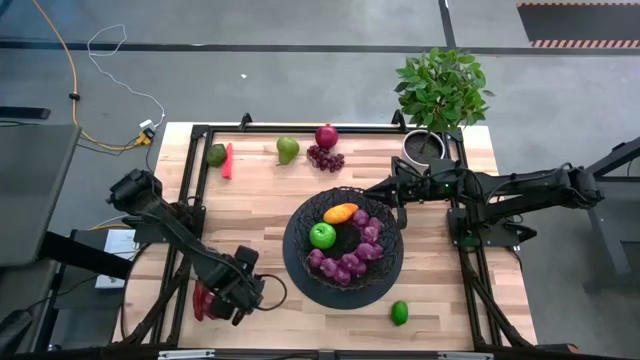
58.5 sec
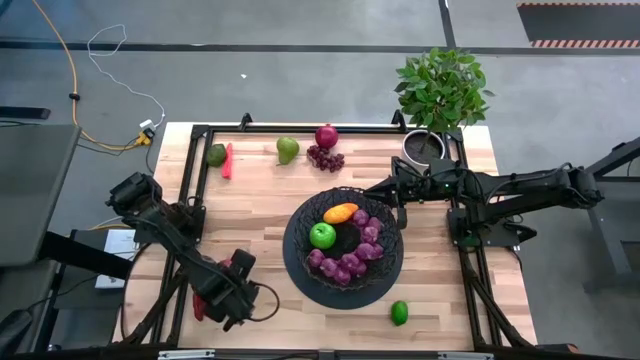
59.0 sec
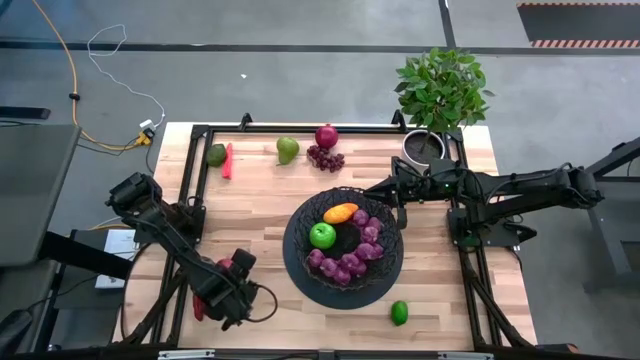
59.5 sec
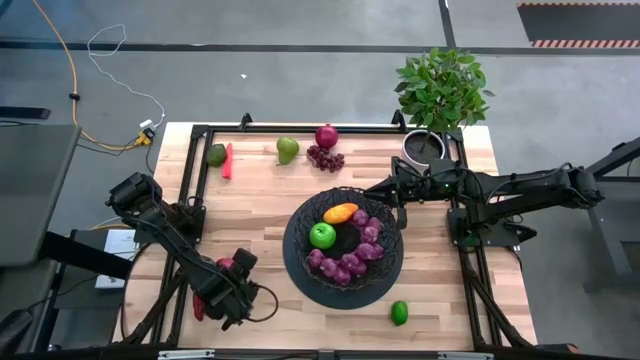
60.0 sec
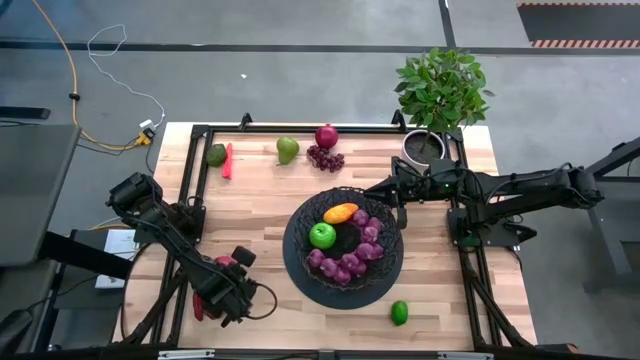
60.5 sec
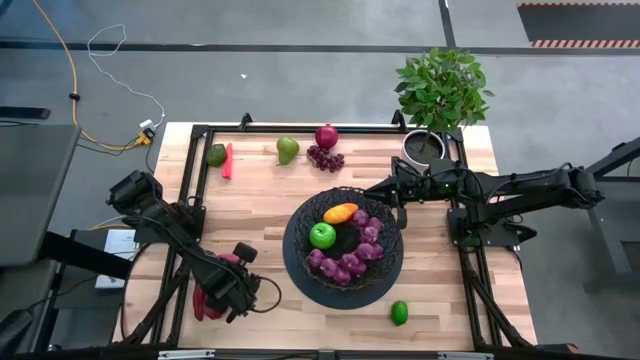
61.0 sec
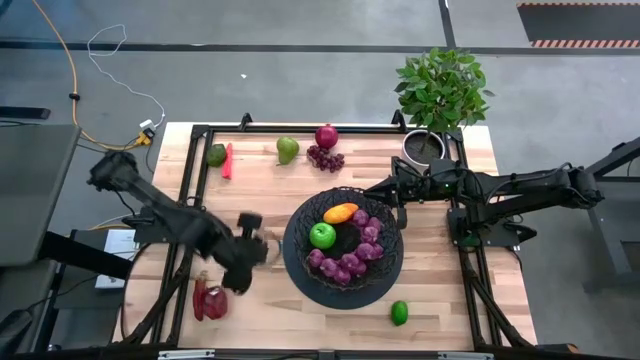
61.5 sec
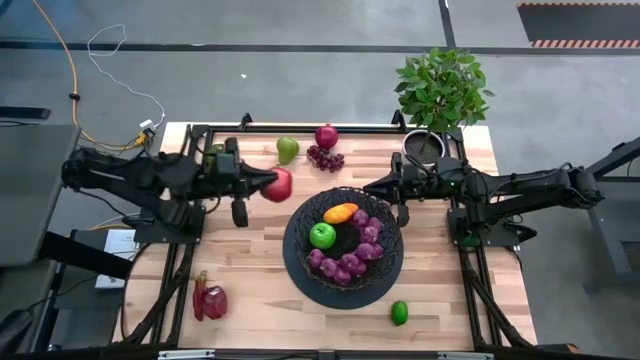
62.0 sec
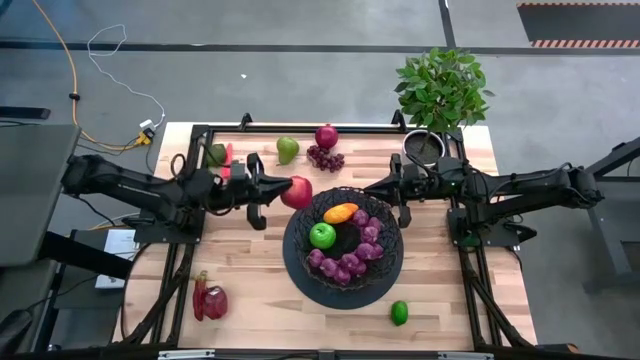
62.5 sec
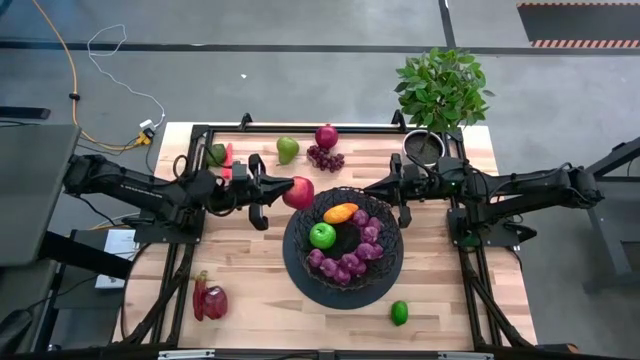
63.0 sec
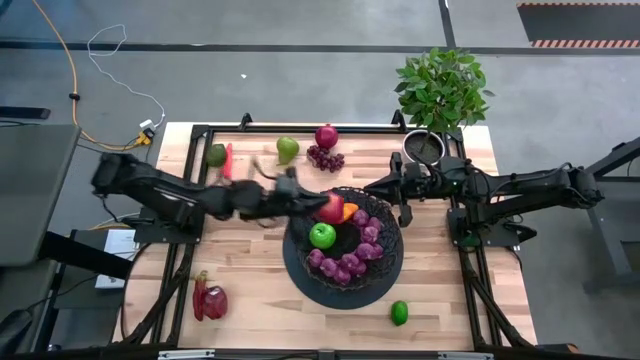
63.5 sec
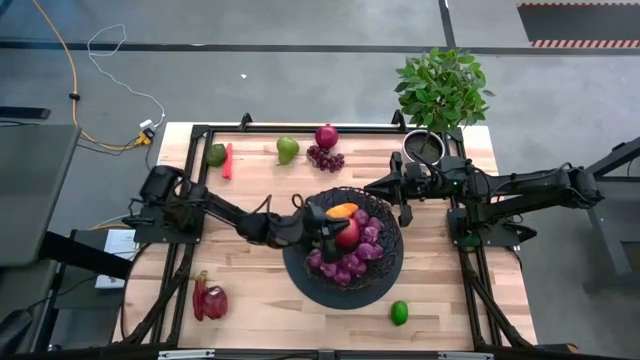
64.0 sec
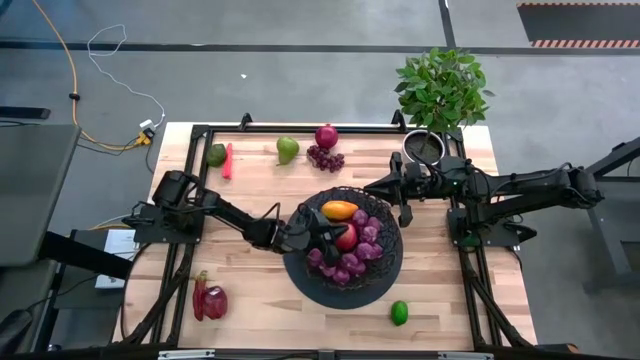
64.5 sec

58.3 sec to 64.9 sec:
Task: Build produce basket
Put the red pomegranate into the basket

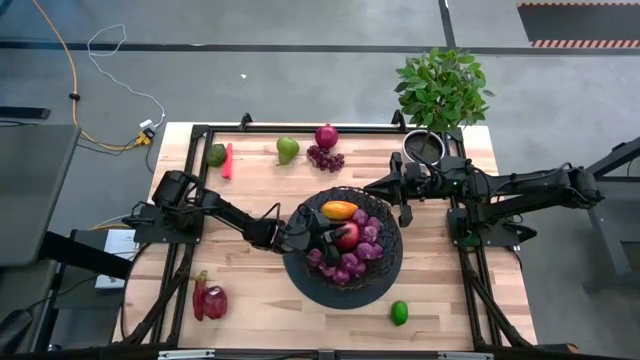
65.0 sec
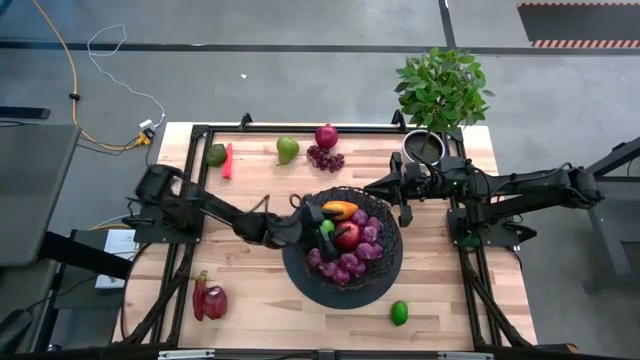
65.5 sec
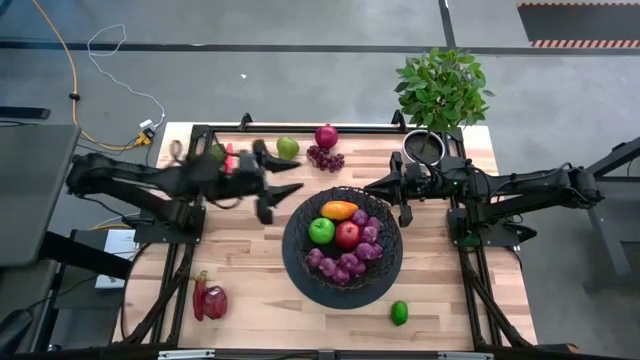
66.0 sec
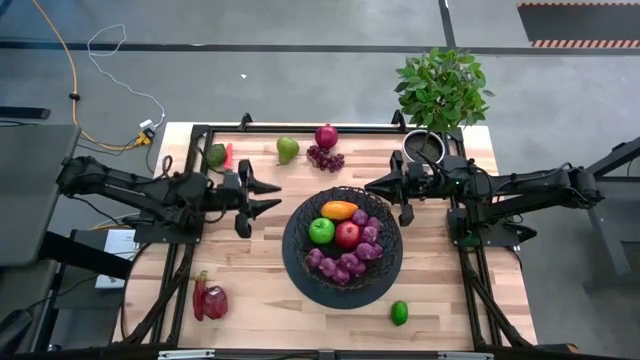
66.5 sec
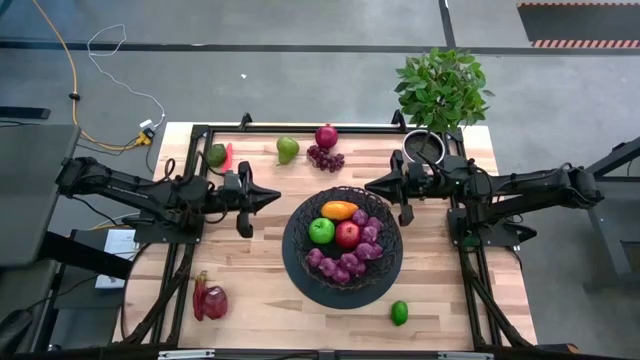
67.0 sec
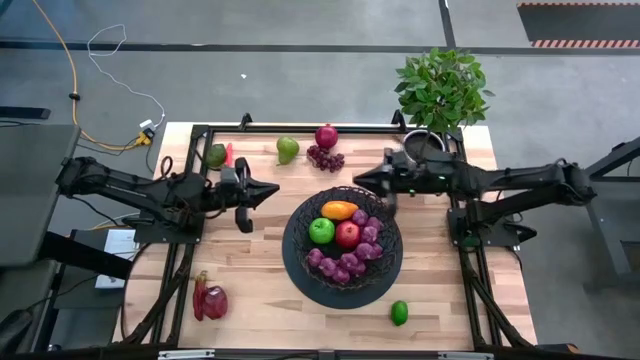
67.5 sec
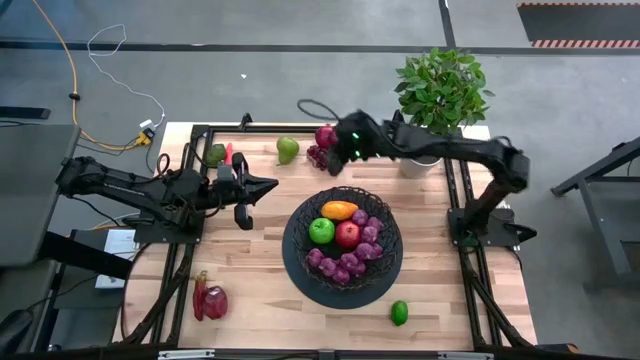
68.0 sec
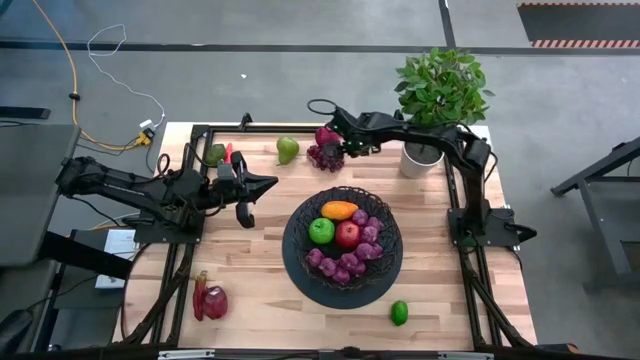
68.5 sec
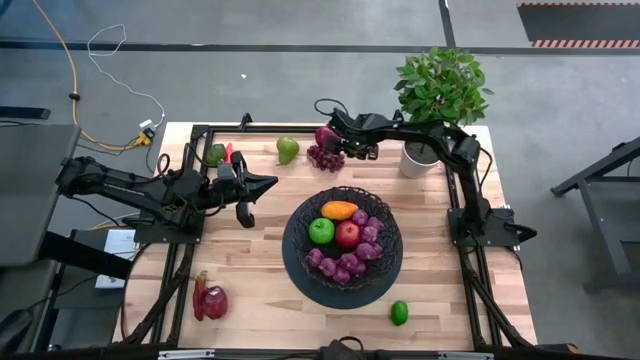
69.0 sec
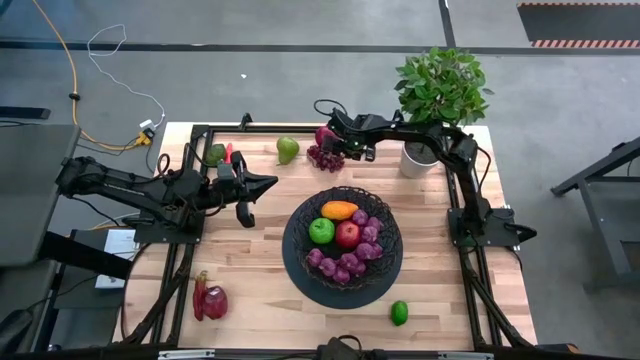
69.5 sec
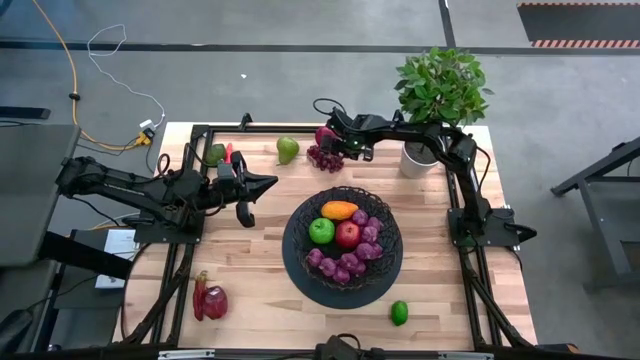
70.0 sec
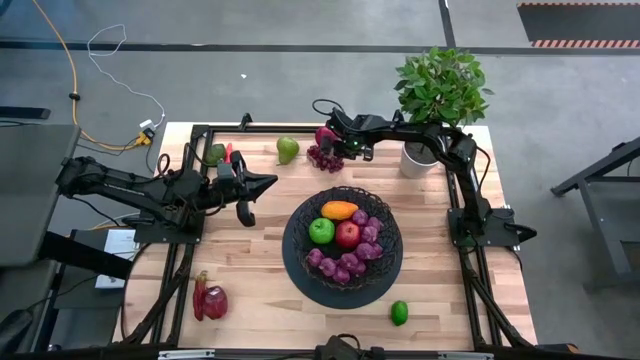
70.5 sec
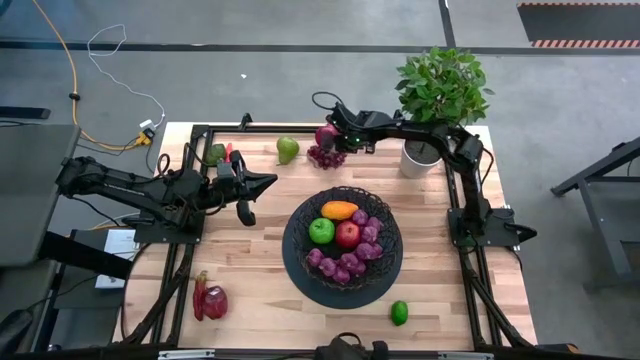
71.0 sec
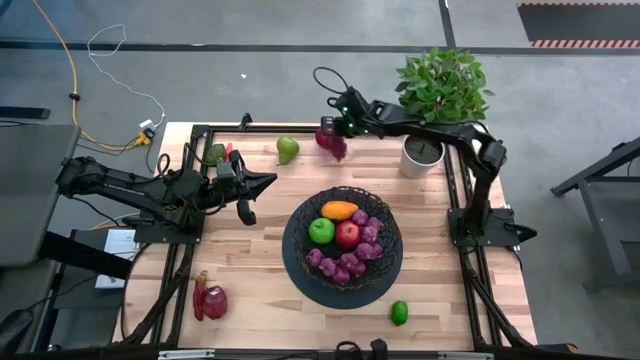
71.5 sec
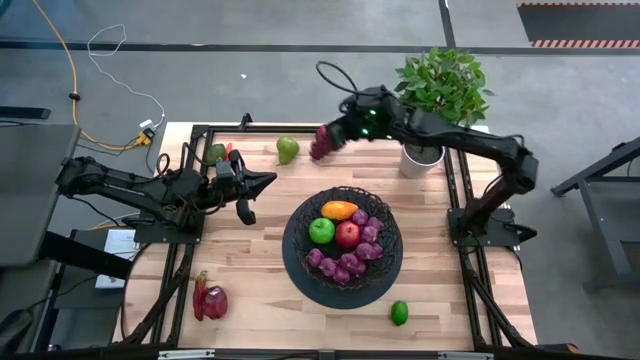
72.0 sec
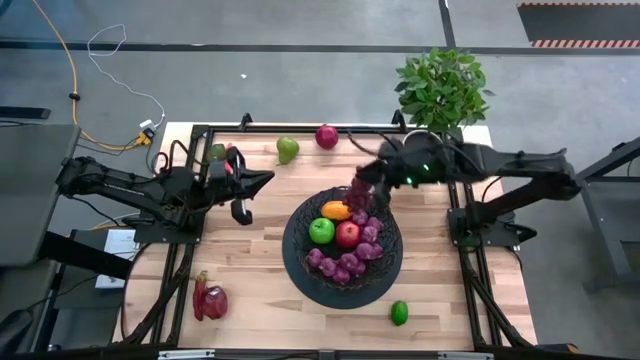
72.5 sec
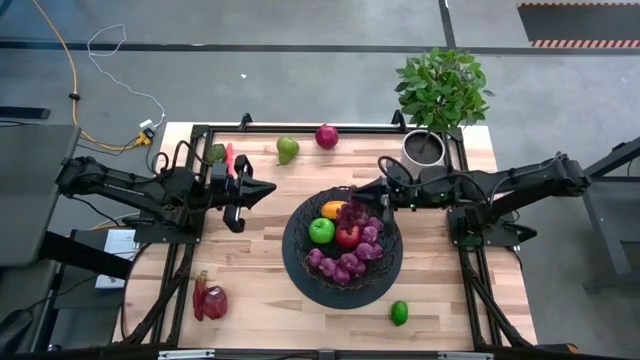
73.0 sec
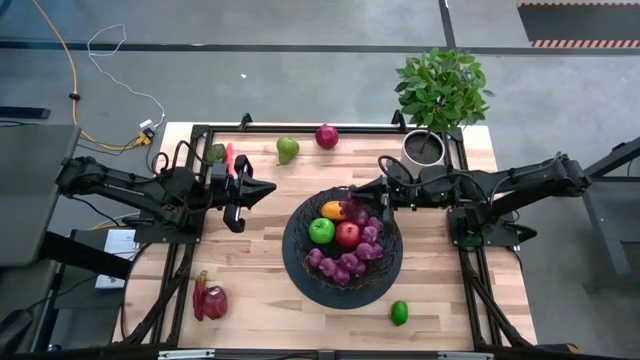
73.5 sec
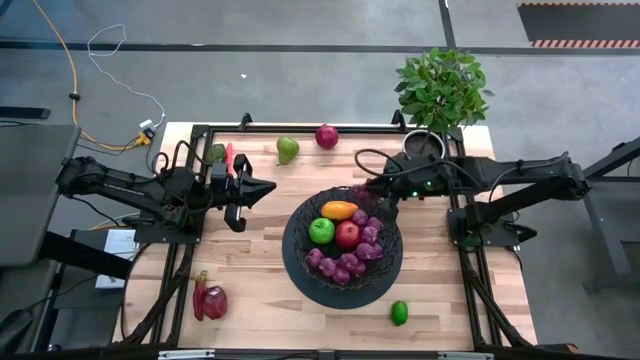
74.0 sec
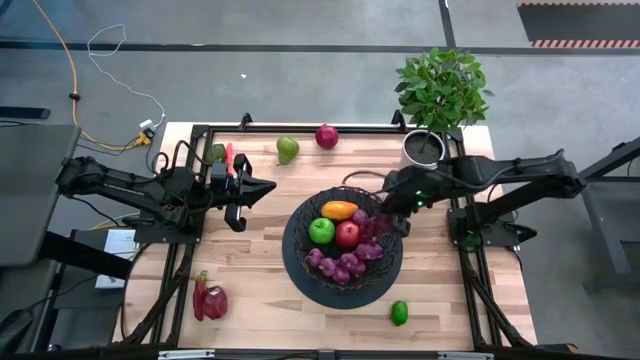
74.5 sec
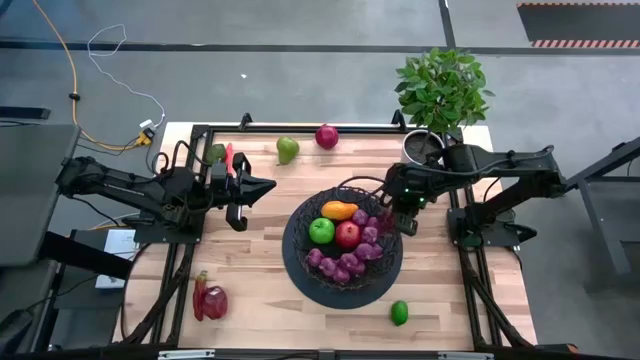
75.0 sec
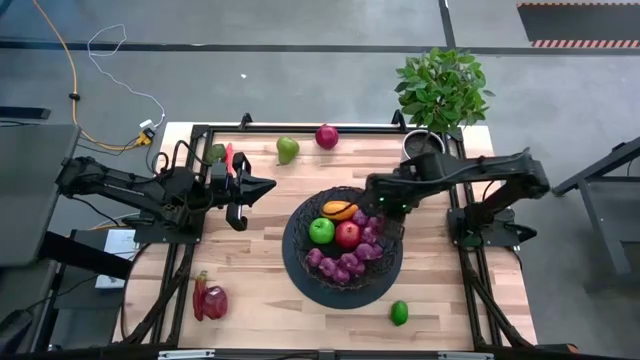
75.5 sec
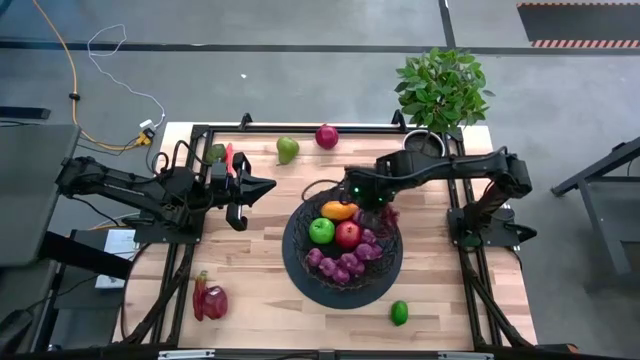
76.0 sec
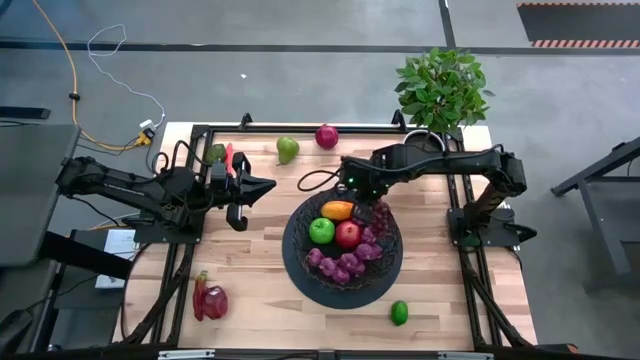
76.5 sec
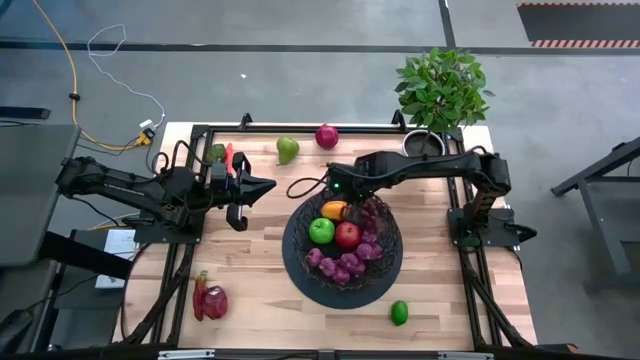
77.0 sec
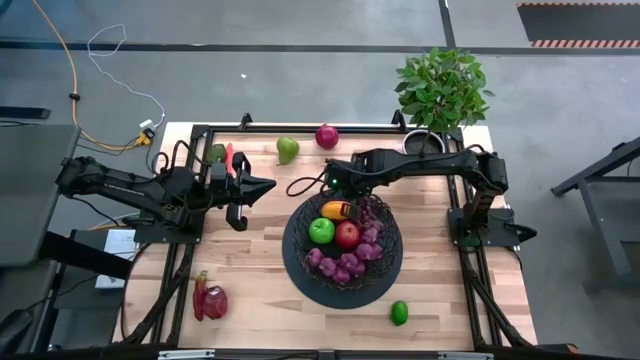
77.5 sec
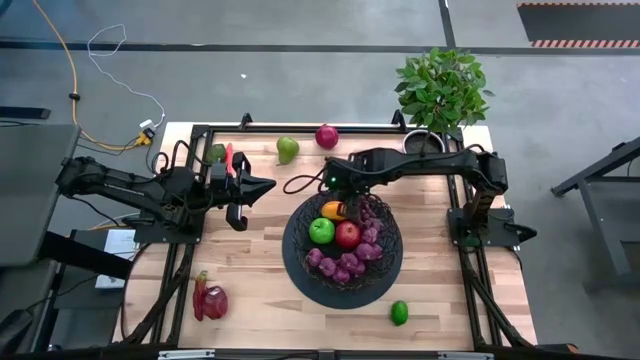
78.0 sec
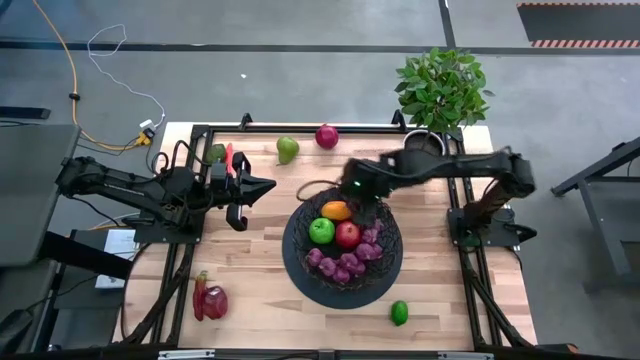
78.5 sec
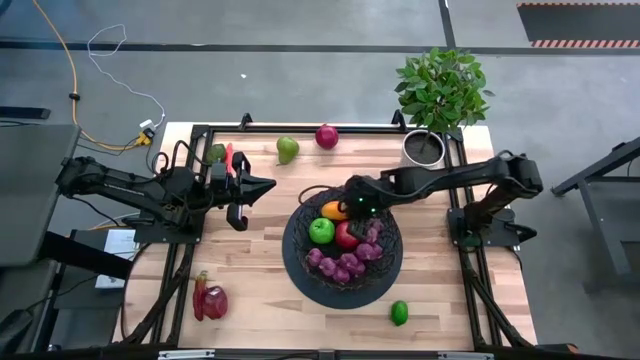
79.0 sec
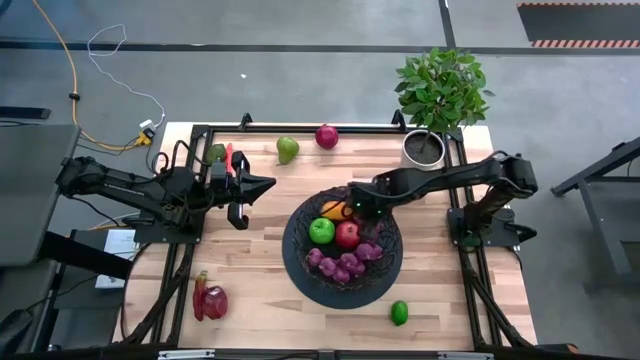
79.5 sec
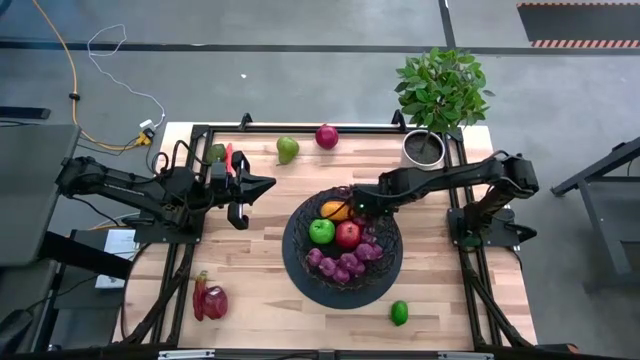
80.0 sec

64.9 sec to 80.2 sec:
Put the red grapes into the basket
